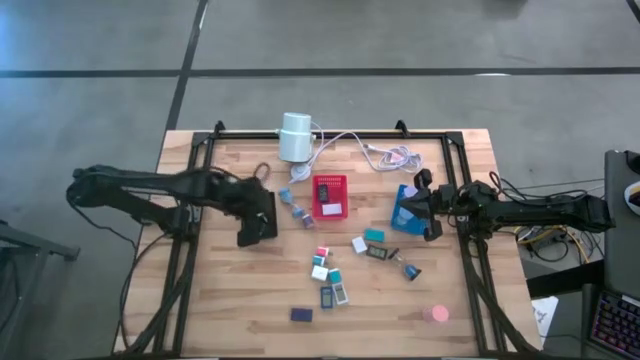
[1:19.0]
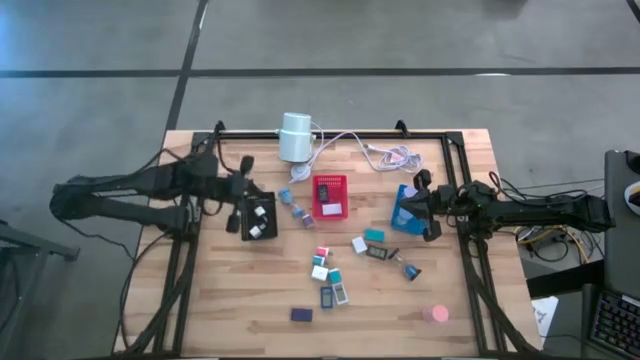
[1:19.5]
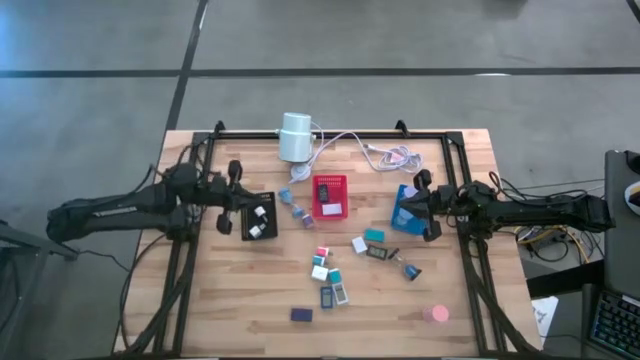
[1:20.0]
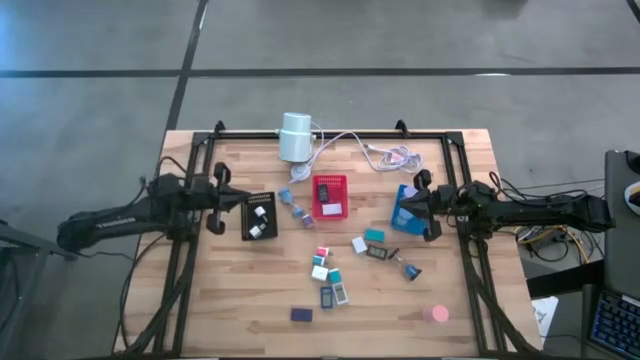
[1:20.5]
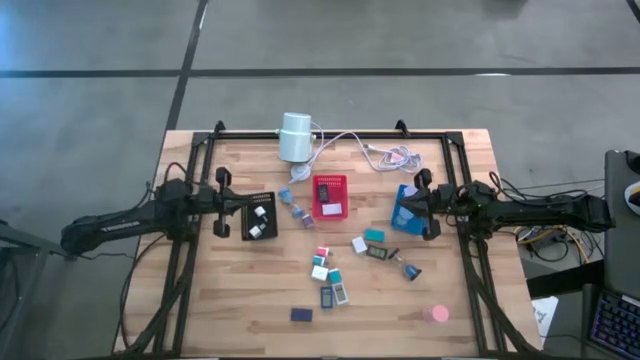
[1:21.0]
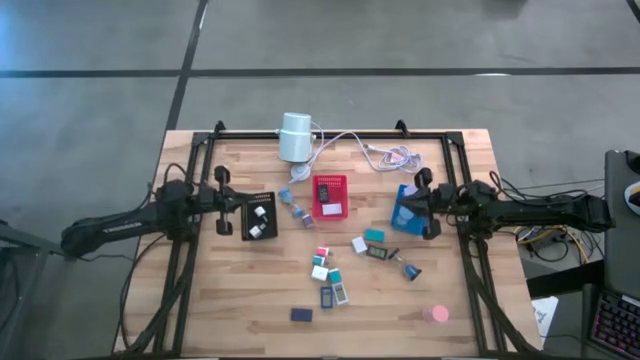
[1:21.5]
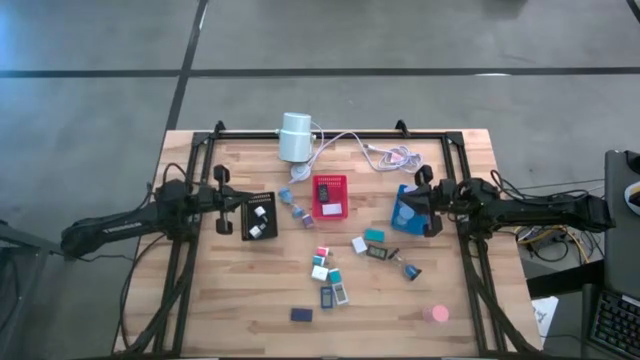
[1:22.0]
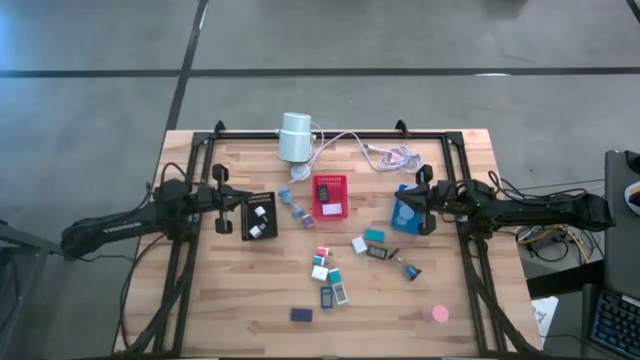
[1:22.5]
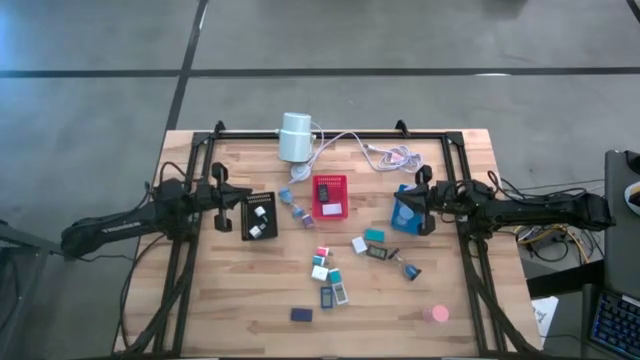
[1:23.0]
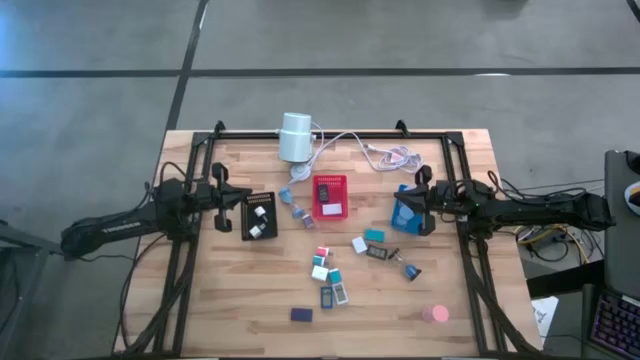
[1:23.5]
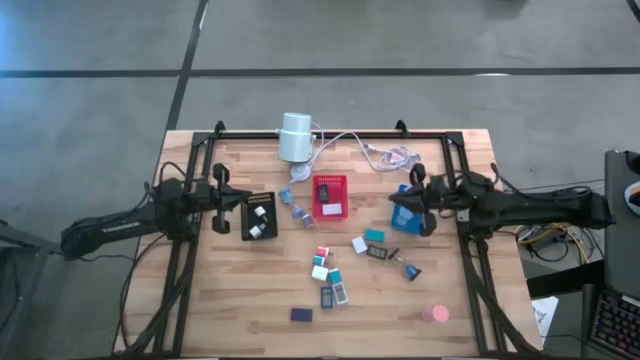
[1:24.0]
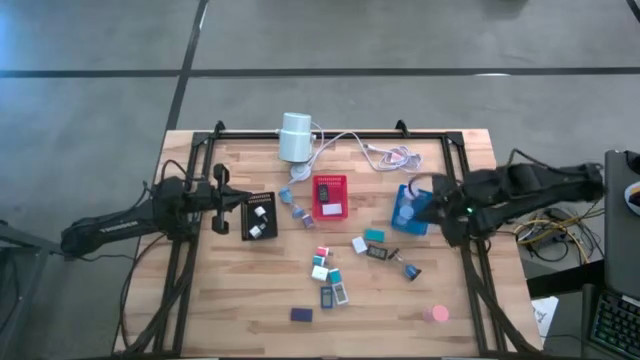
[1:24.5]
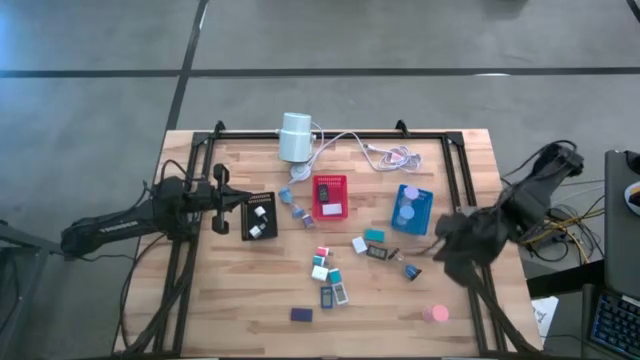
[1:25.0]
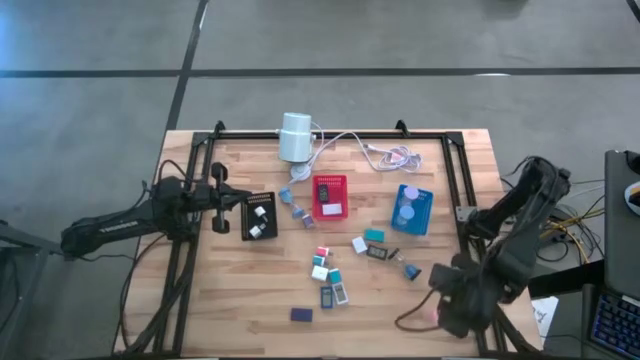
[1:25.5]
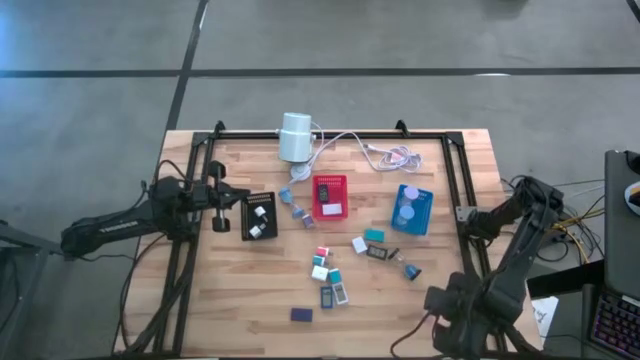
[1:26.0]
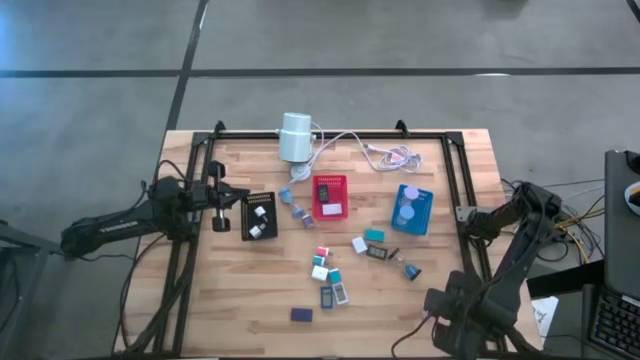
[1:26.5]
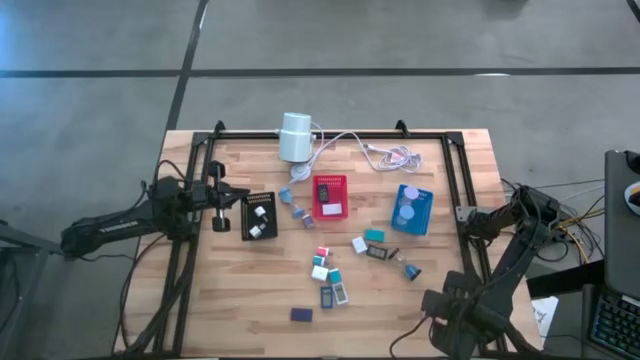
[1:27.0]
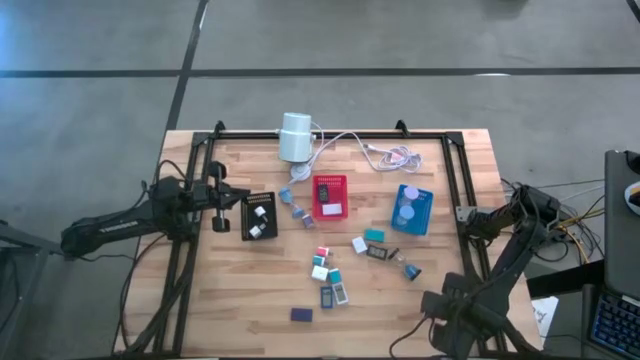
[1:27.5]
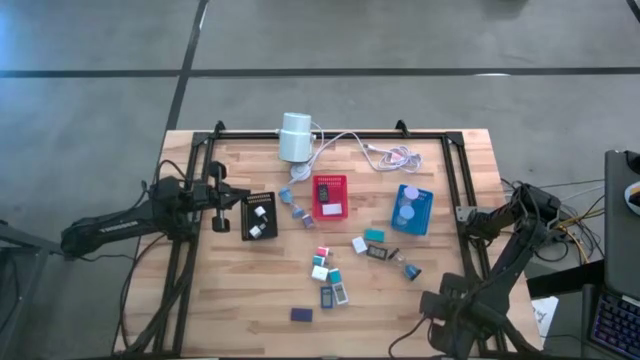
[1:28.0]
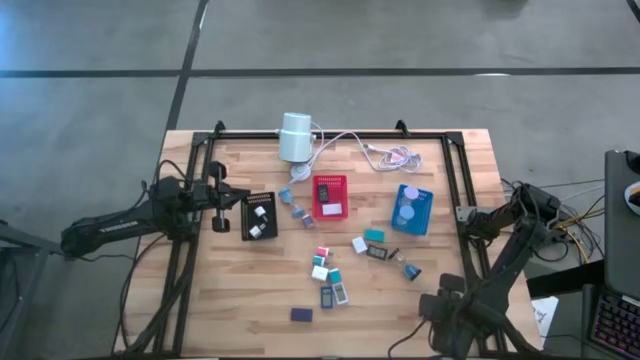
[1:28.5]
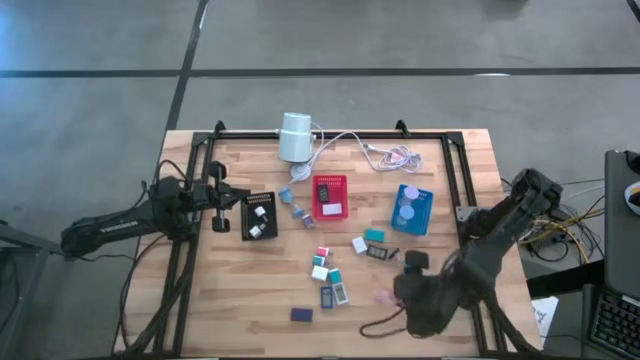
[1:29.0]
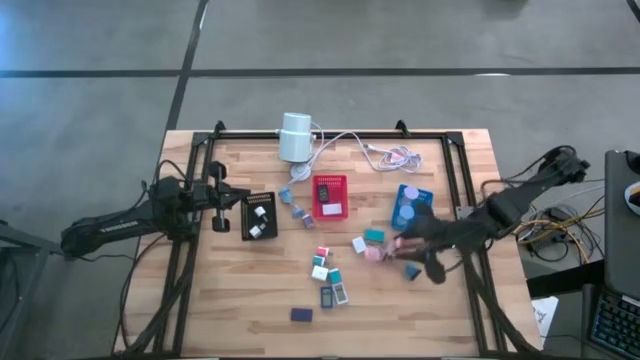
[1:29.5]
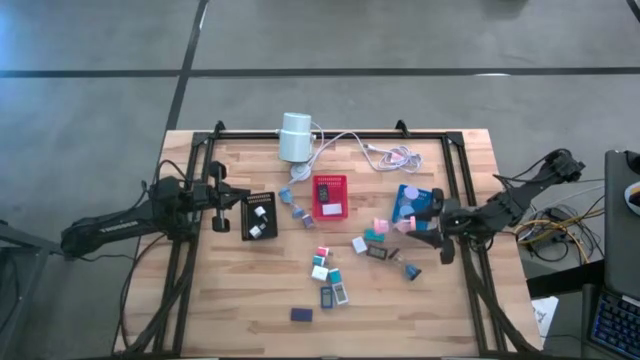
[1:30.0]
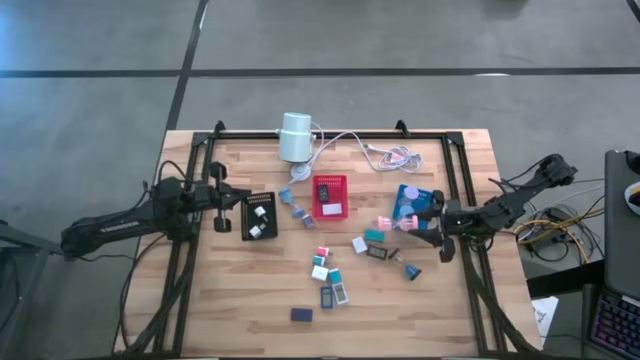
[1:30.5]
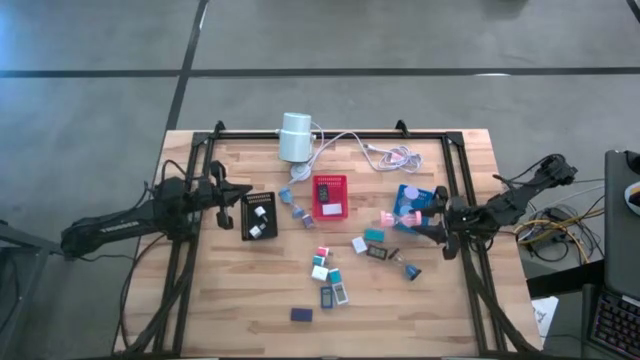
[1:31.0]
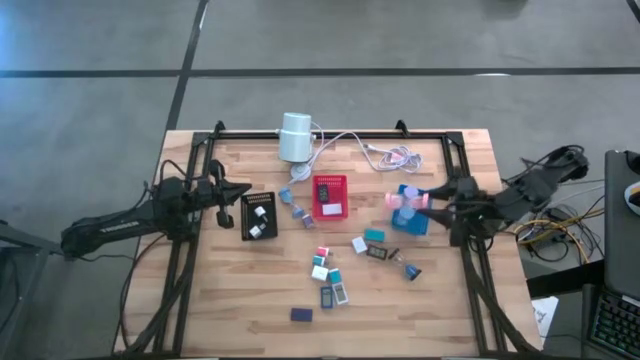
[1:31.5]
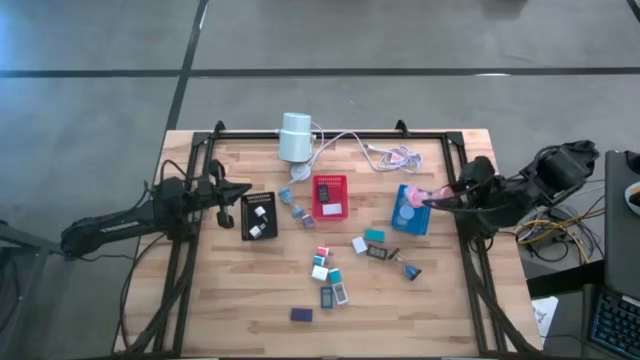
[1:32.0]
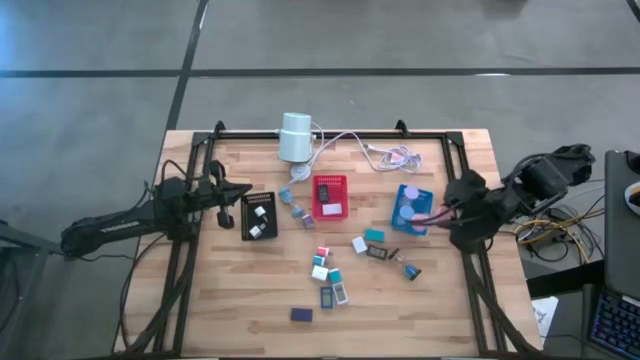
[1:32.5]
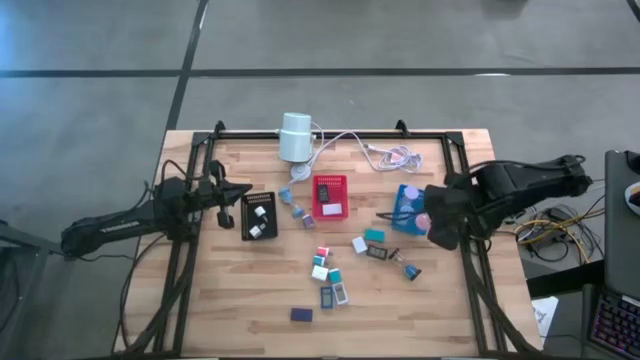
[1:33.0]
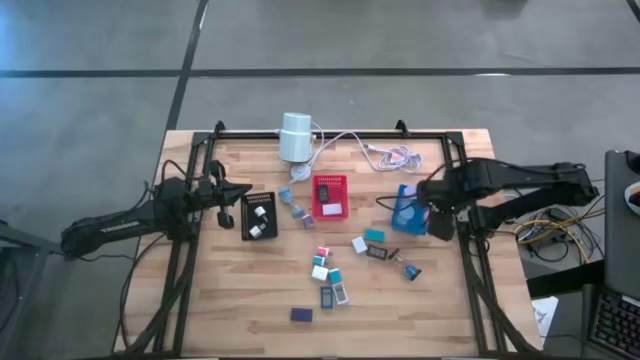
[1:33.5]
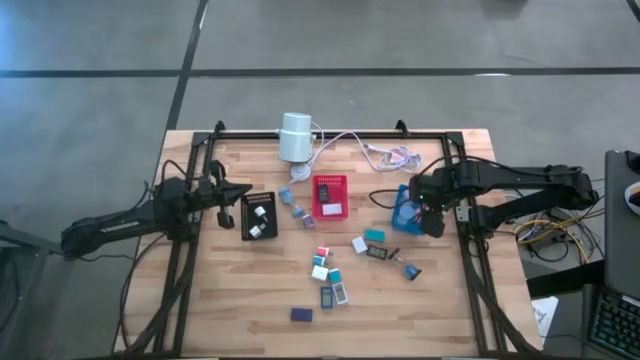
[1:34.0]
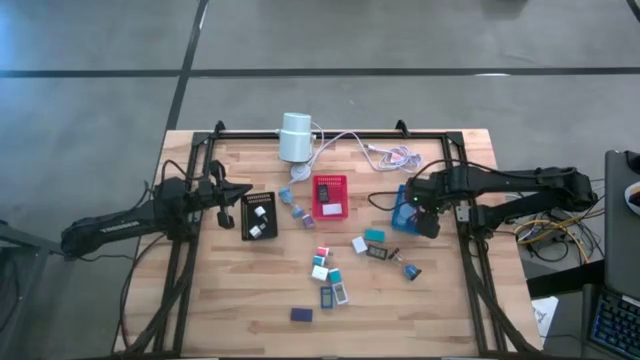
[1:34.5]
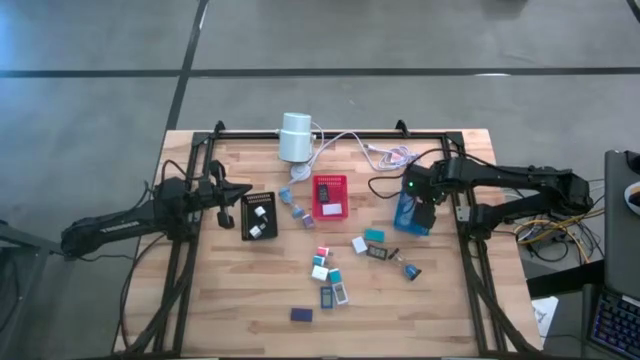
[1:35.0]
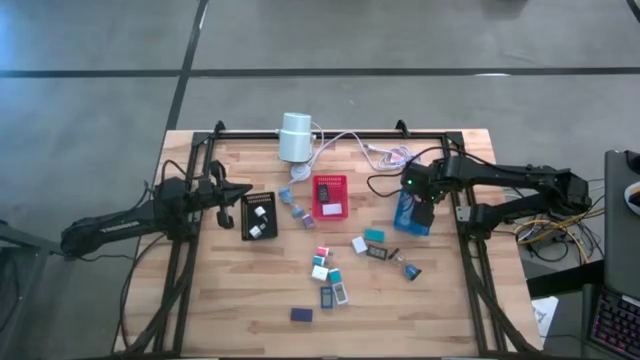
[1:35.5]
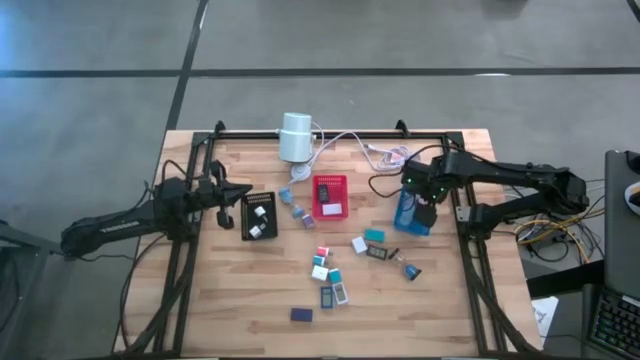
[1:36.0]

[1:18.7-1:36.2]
Task: Pick & Place Office items
Put the pink hourglass into the blue basket

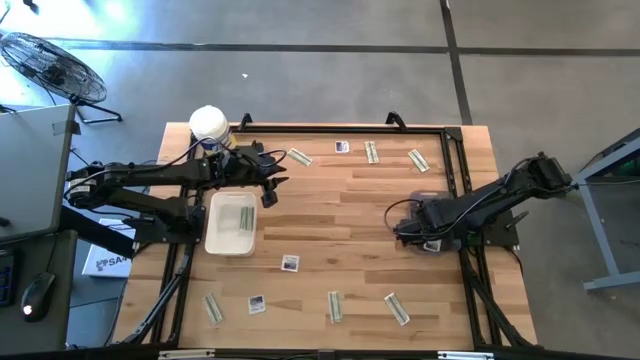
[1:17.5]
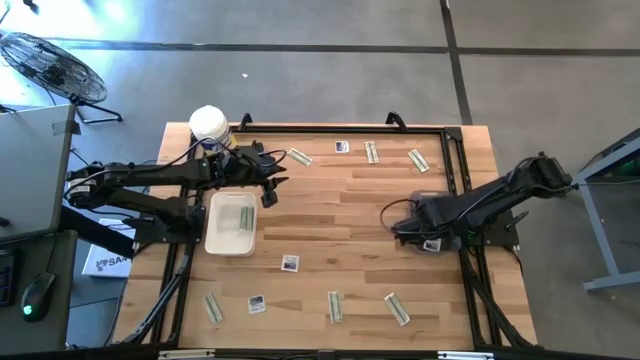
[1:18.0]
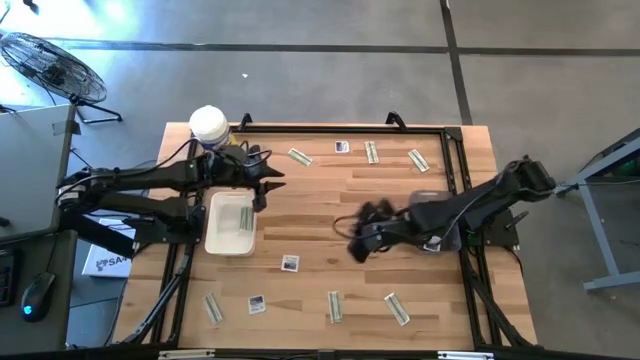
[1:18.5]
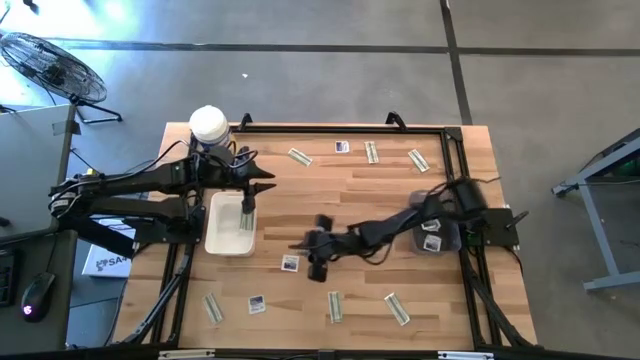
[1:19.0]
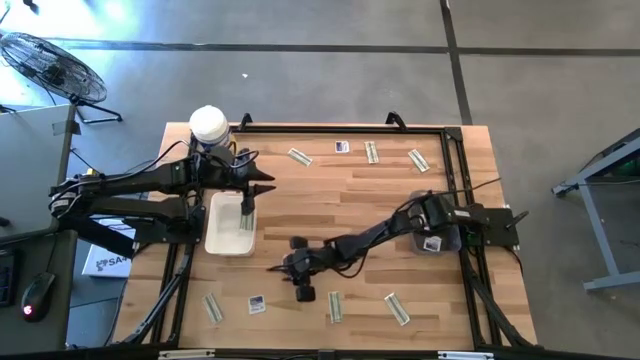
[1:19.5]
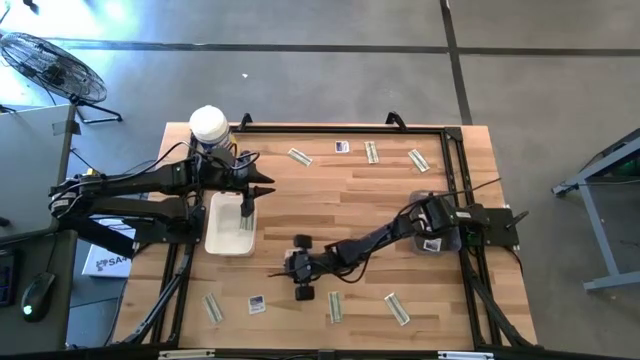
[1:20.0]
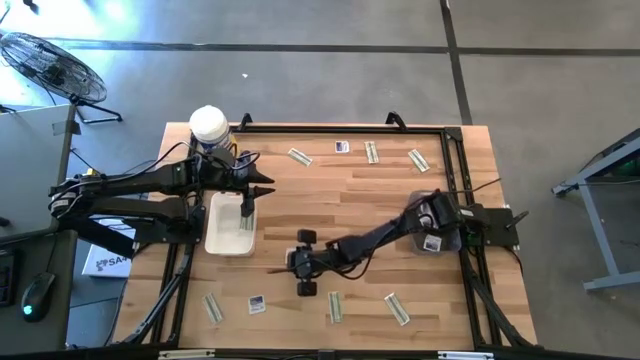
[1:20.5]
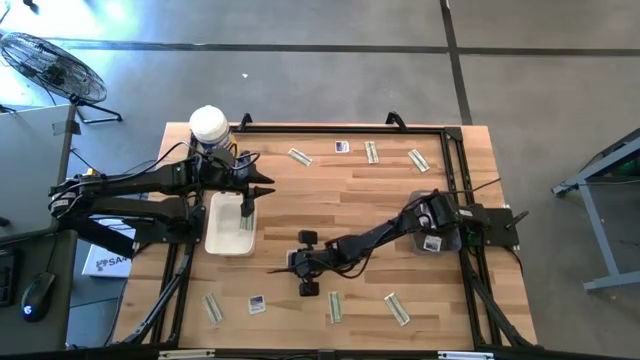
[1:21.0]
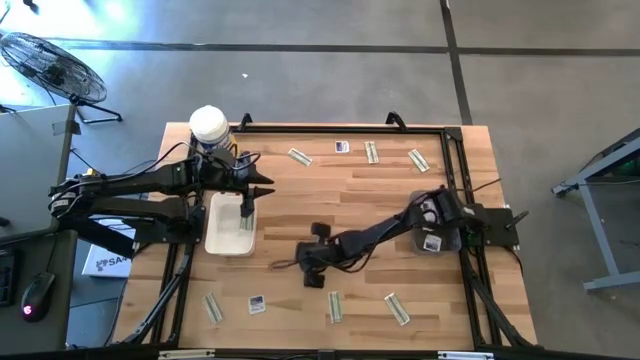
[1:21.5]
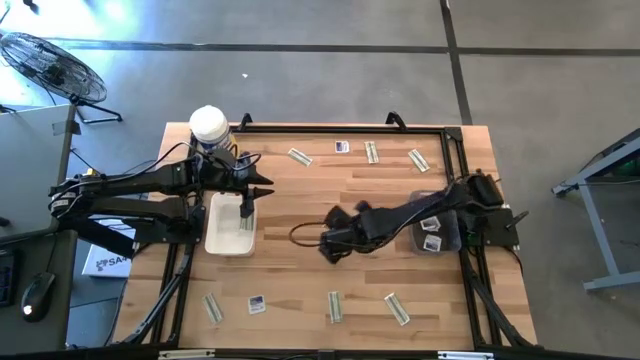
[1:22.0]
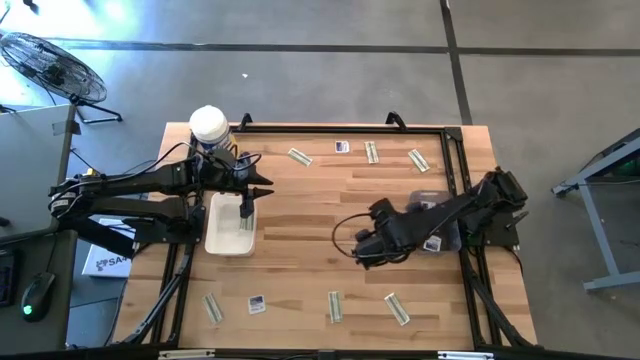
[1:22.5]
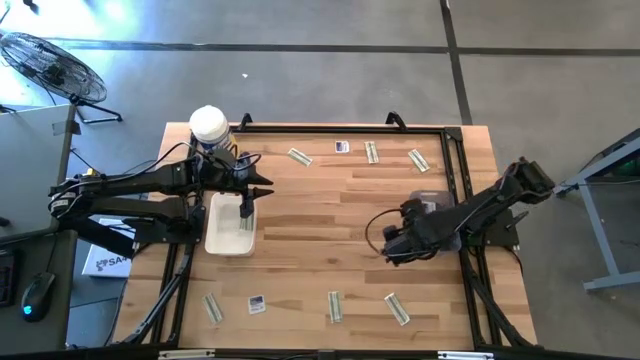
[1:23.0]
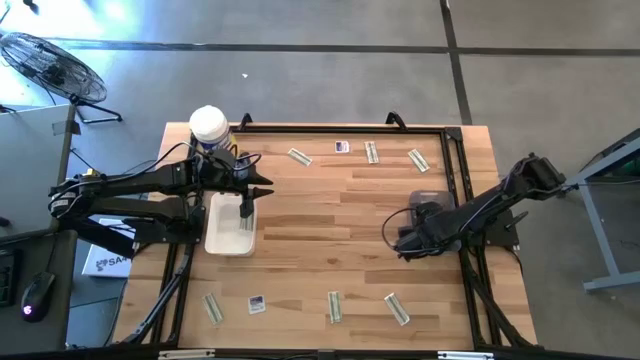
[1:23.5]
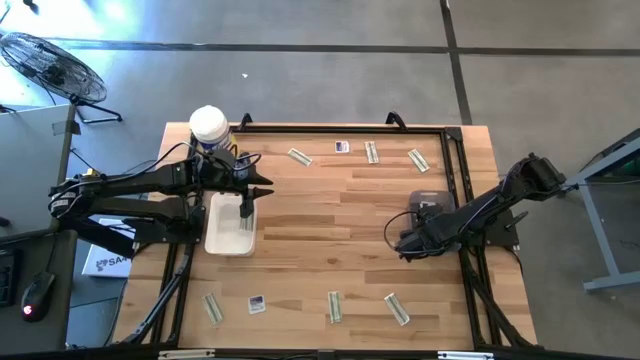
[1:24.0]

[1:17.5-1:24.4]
Task: Pick & Place First Aid Supplies
Put the blue alcohol pad into the black bin
